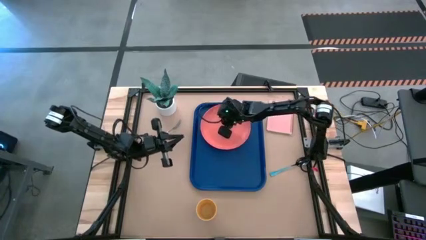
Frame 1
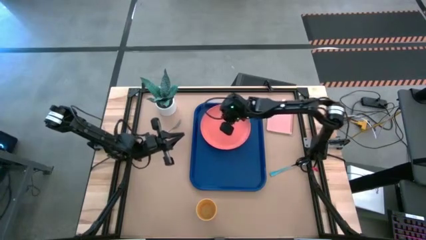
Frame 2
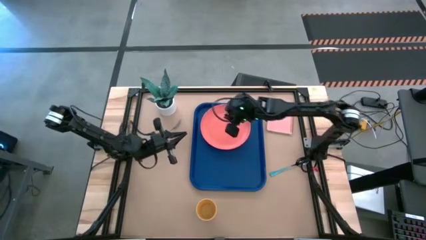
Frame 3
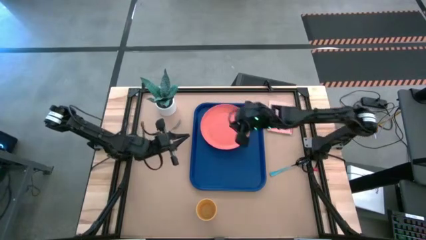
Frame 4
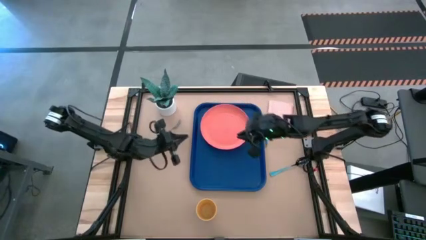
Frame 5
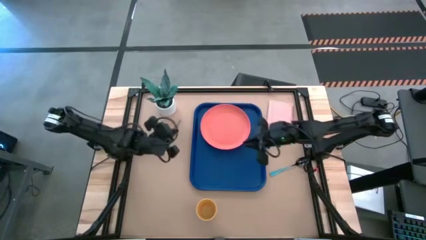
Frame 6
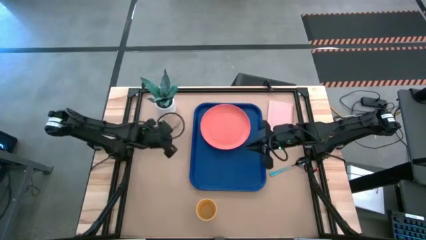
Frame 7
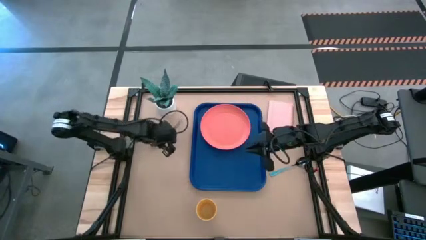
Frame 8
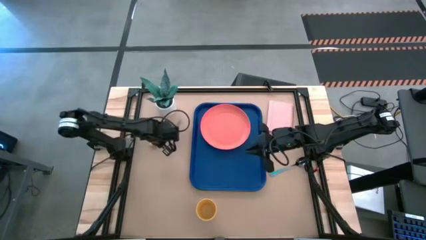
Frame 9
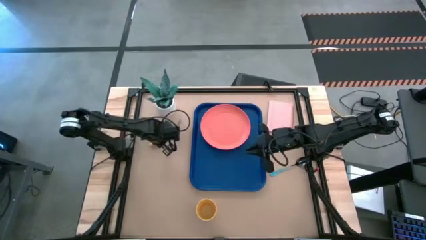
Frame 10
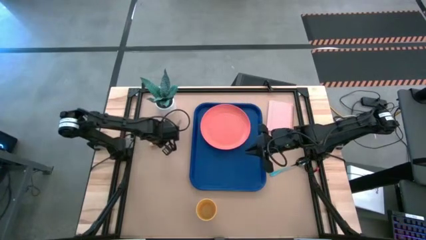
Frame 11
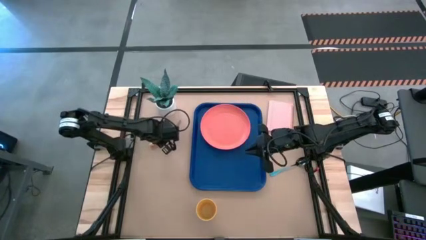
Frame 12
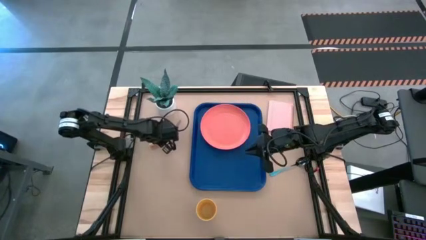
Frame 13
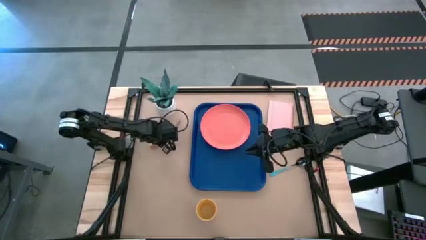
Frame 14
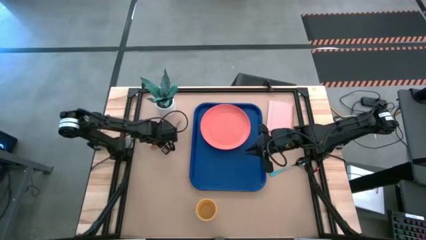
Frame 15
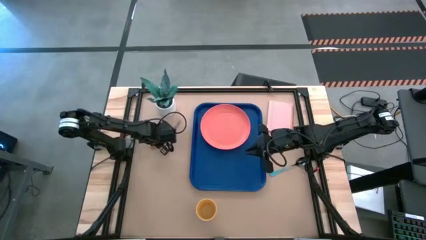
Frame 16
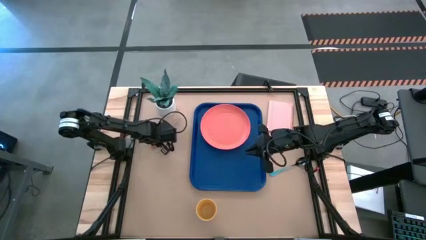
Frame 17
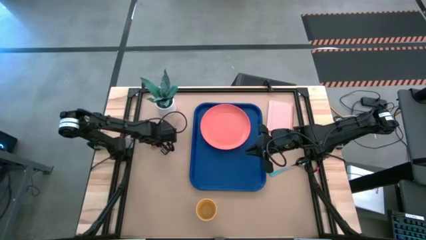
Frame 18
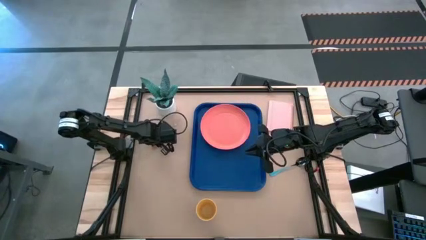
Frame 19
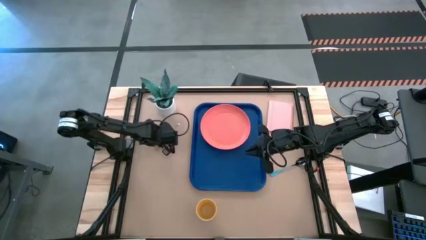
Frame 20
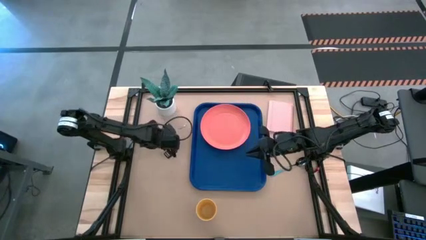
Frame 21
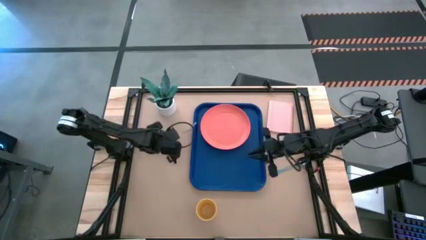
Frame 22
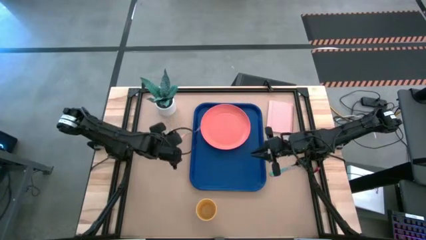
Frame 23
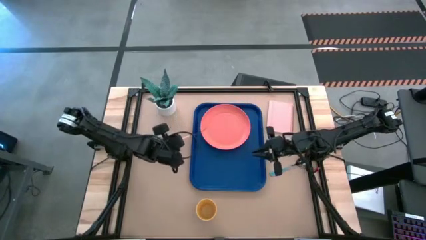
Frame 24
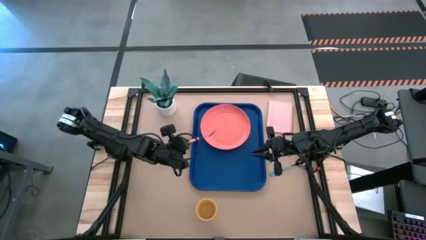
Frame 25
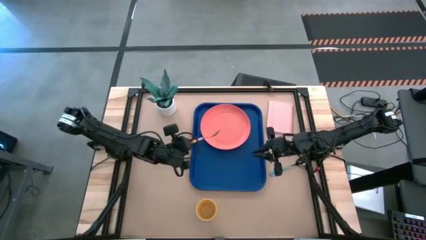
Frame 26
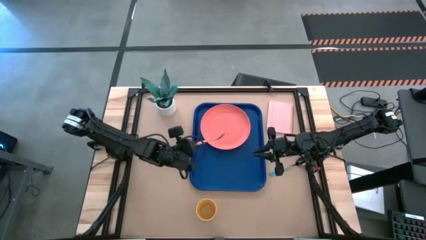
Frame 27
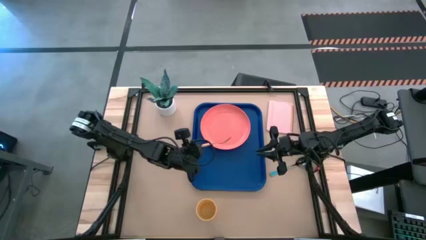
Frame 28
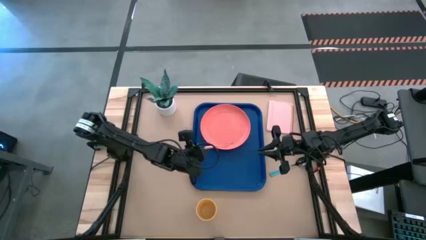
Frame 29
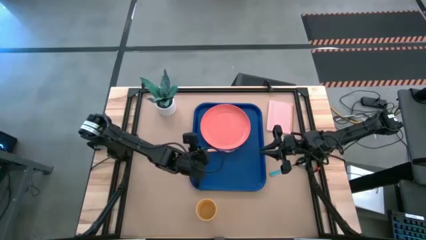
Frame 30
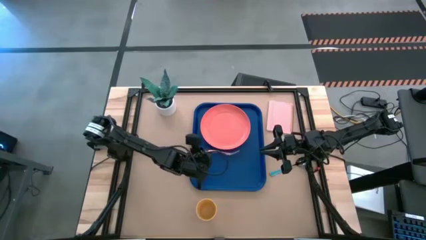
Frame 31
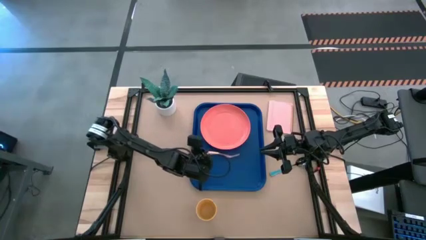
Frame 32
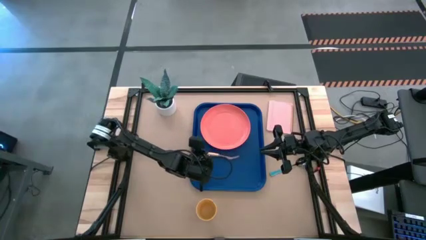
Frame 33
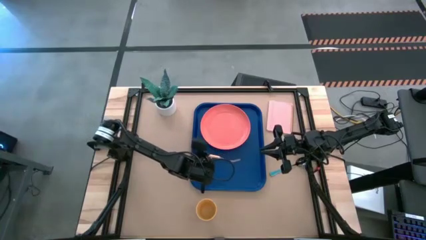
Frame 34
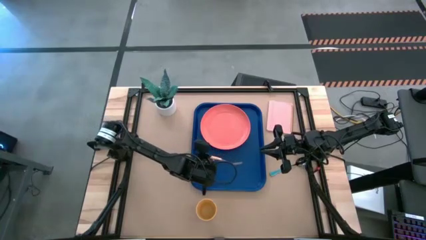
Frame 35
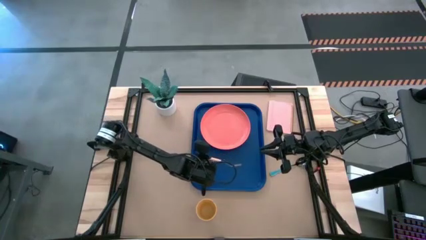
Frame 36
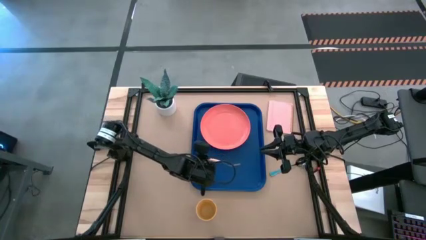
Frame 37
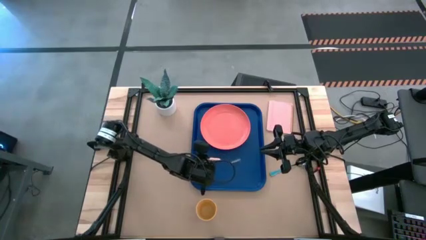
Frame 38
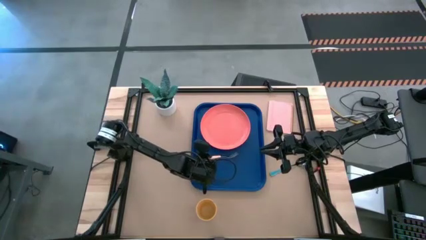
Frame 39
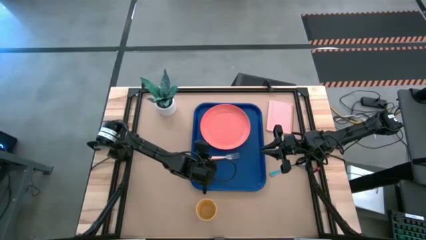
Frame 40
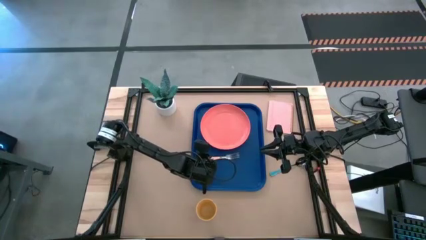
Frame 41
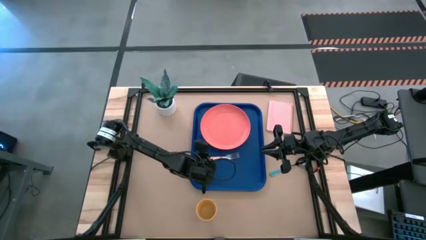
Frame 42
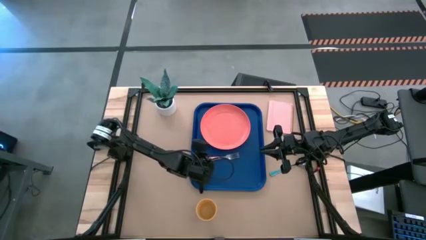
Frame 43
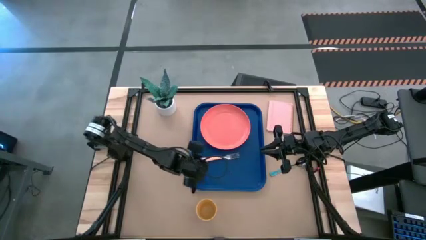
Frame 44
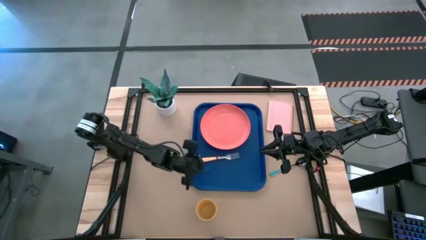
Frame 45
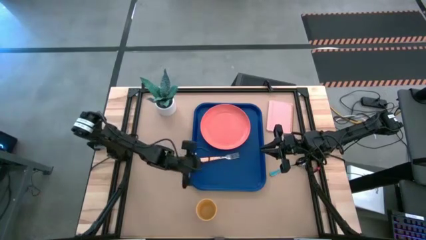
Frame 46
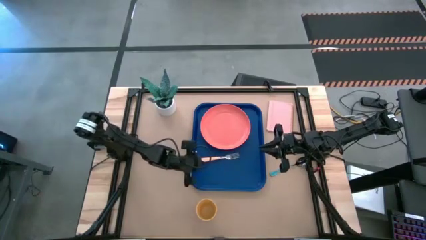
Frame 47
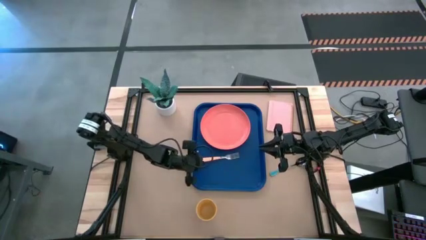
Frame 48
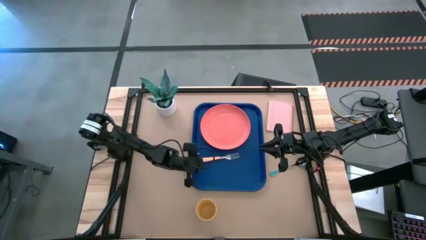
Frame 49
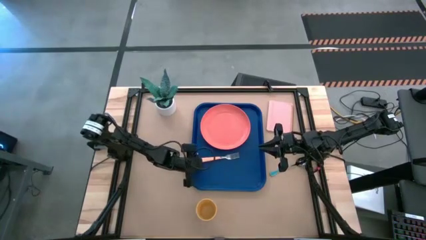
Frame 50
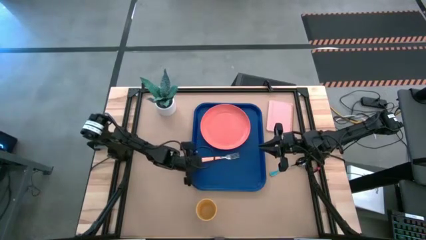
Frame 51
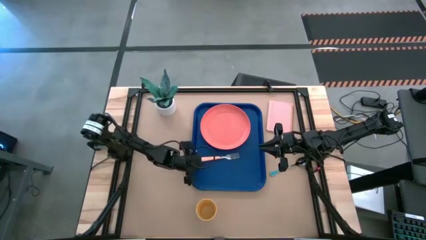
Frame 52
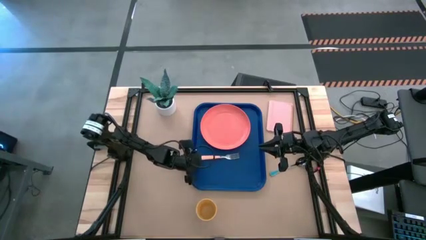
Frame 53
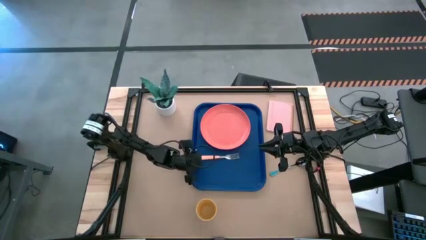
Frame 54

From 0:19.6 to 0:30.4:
Task: Pick and place plate/cup/fork/spoon on tray
Put the orange fork on the blue tray on the right of the orange plate

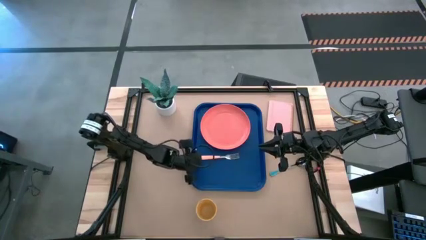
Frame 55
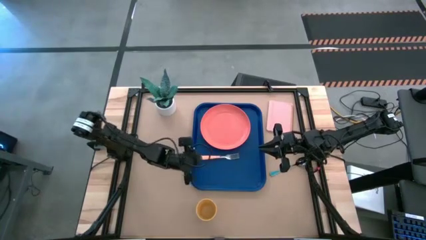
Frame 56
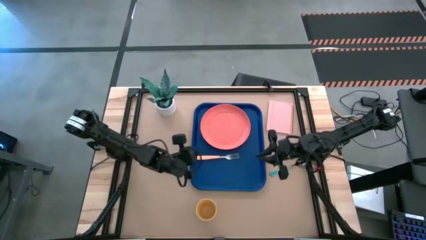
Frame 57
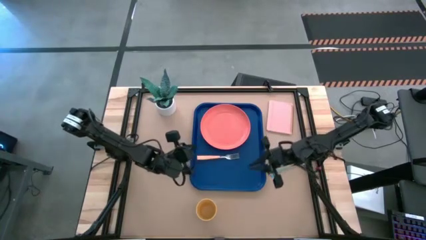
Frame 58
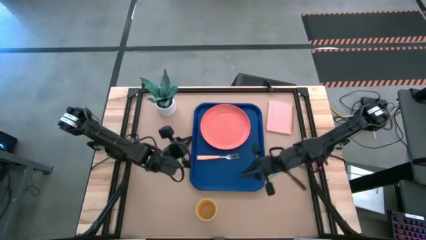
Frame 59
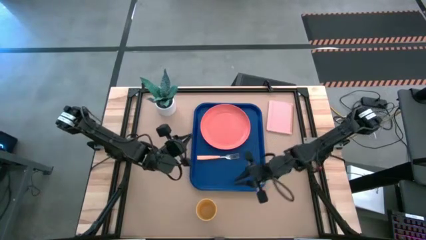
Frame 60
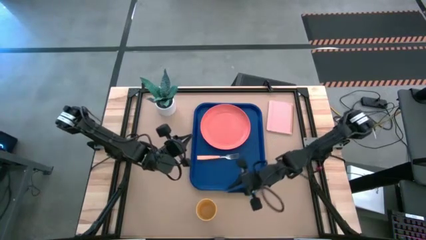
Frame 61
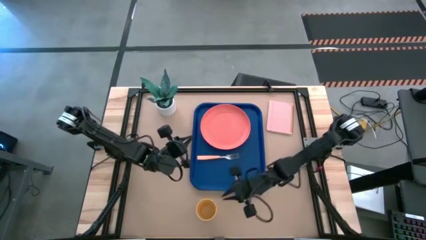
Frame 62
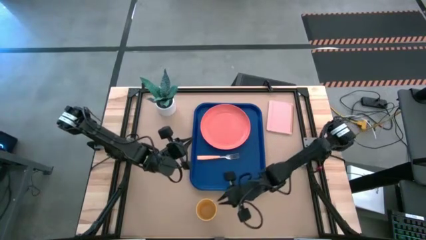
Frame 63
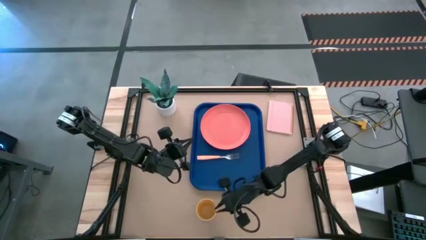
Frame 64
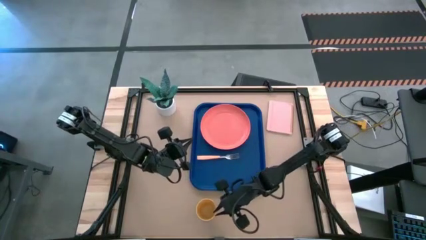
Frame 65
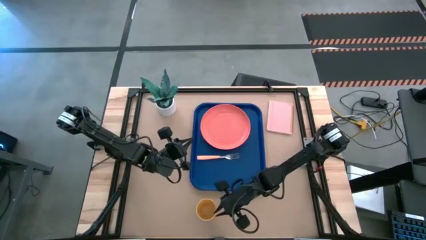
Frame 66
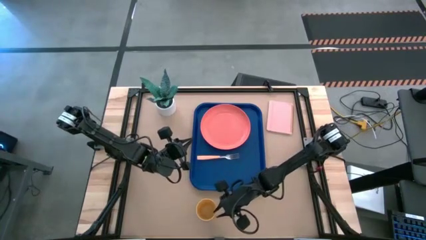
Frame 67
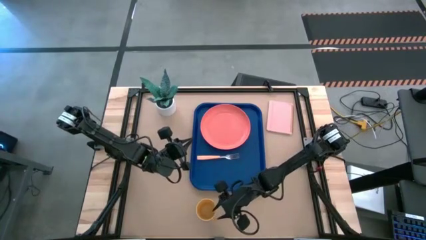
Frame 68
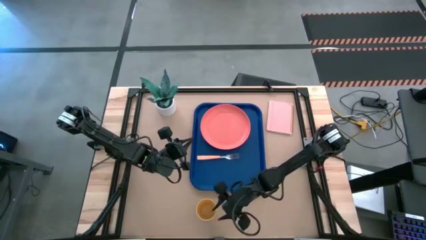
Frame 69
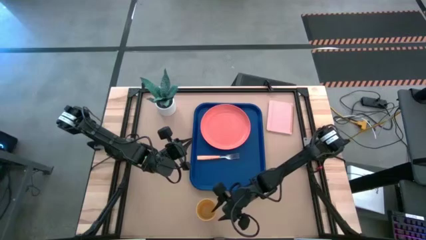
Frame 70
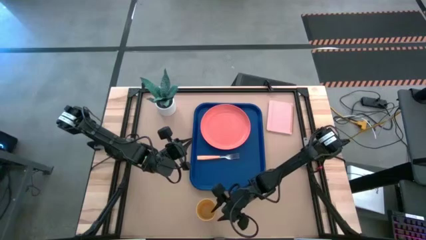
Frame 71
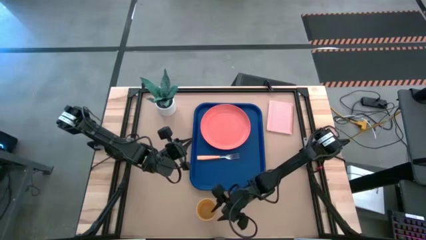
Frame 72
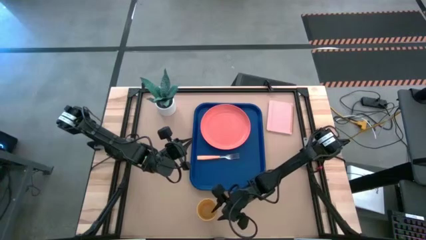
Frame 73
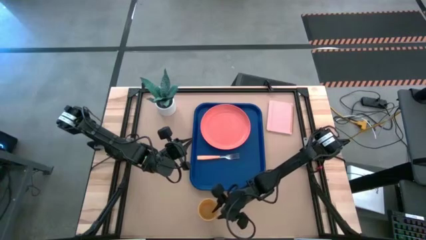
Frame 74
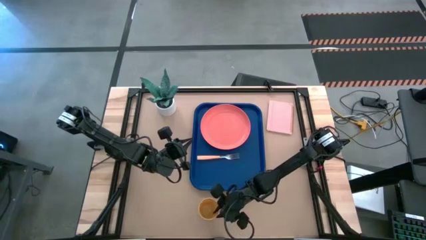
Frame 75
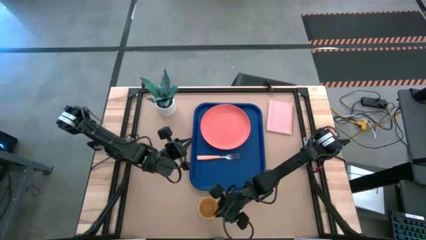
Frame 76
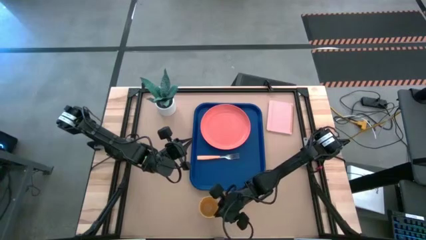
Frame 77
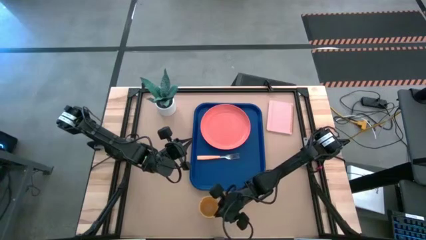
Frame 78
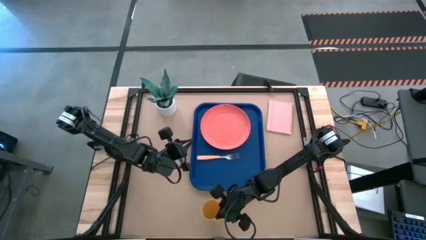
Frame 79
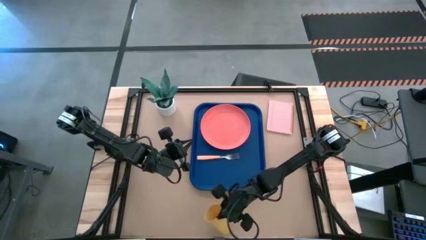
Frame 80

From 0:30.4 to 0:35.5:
Put the yellow cup on the blue tray on the top right of the orange fork
